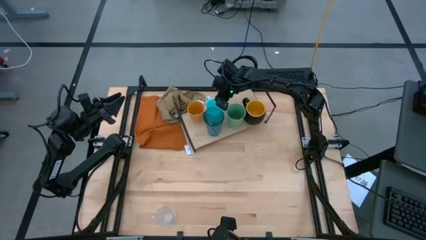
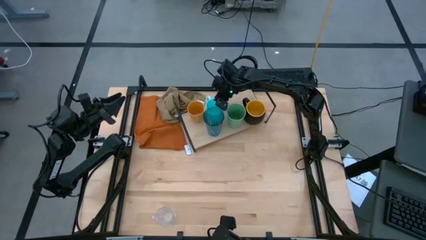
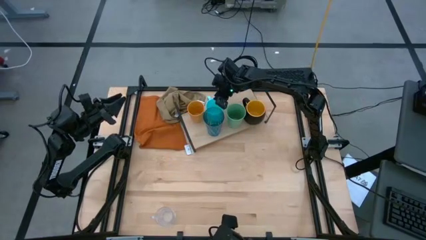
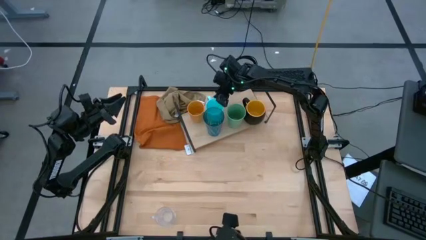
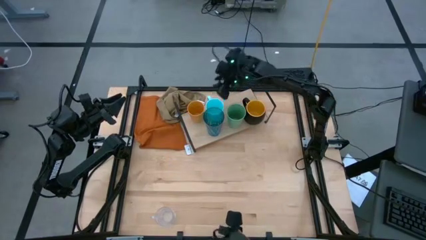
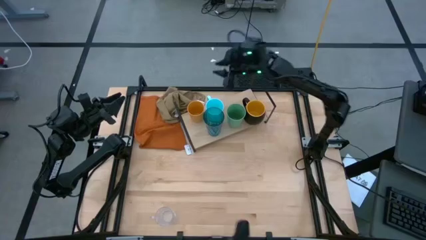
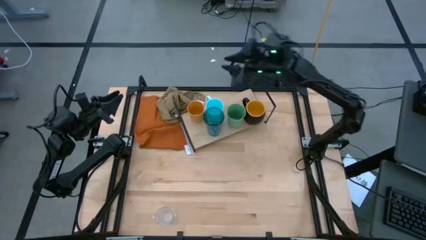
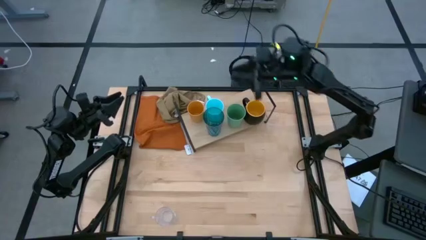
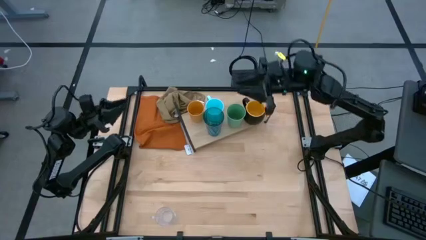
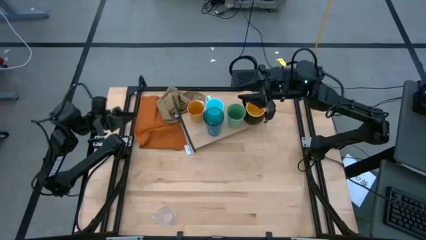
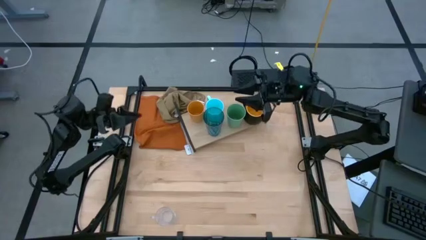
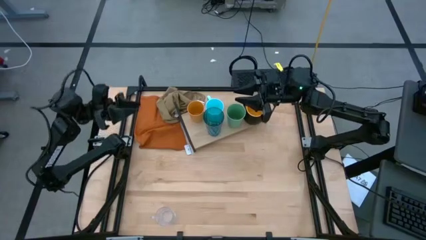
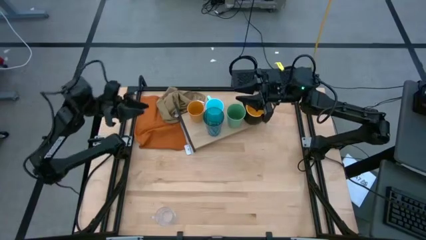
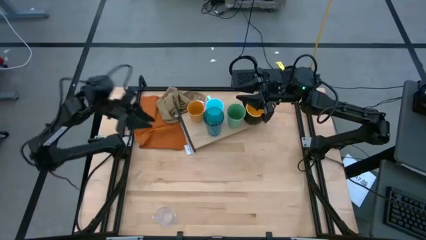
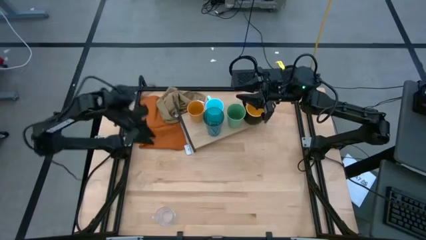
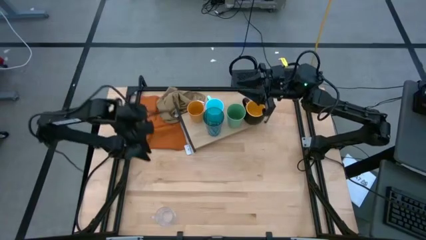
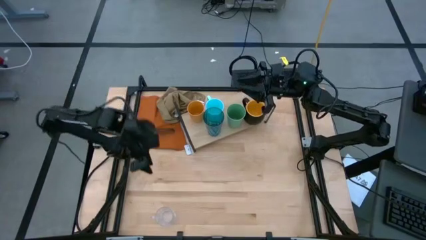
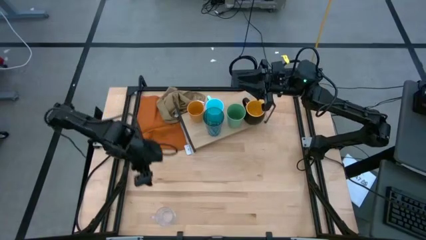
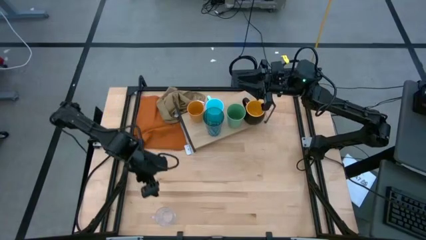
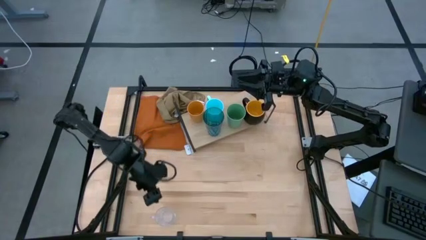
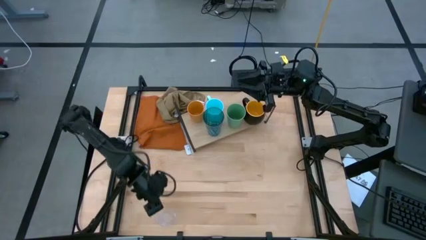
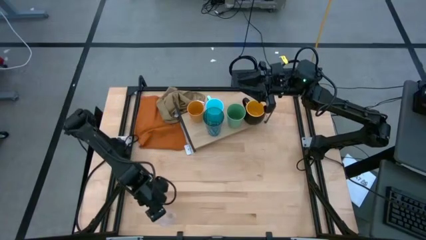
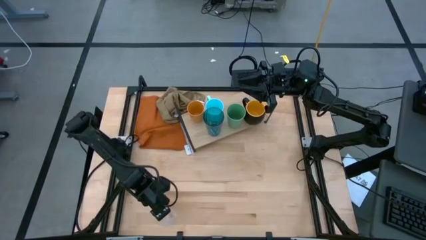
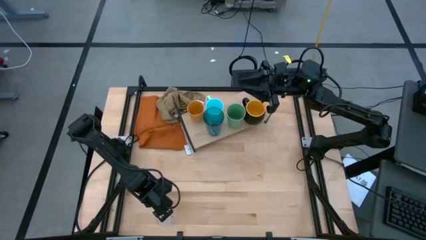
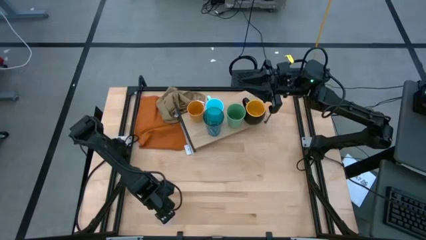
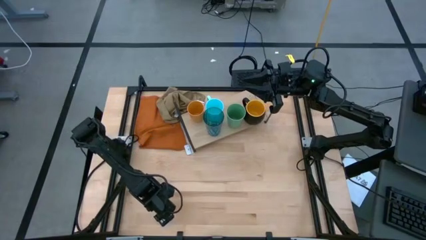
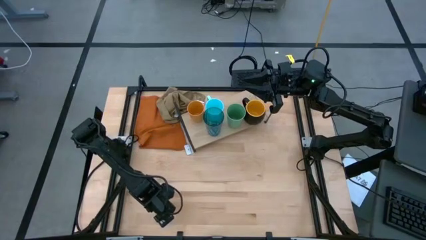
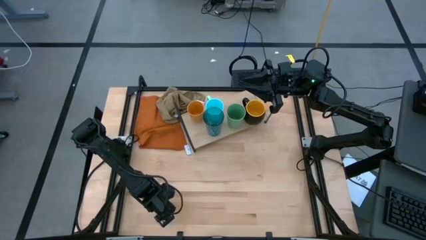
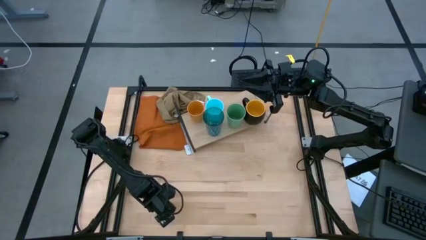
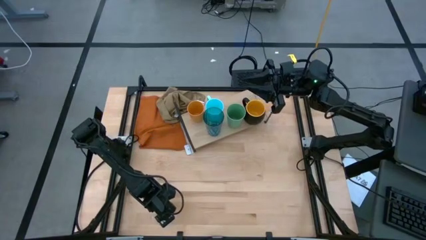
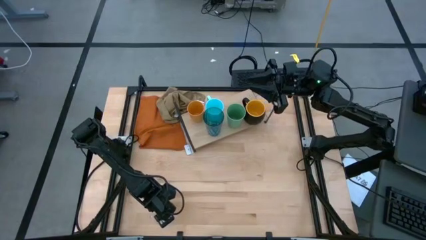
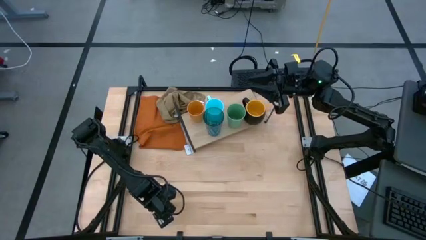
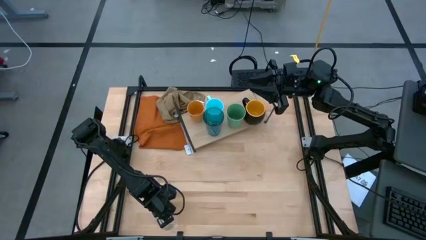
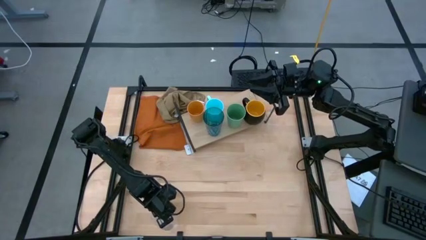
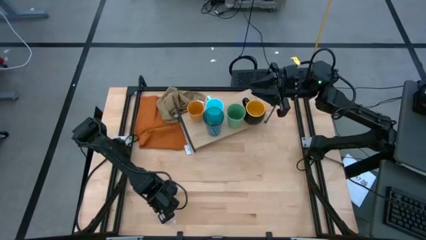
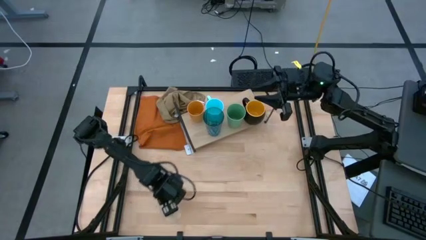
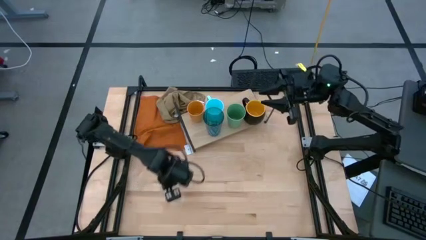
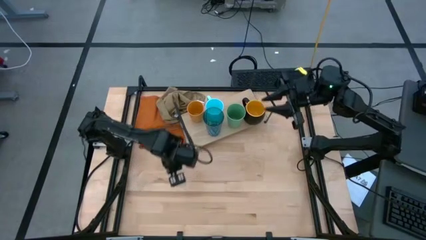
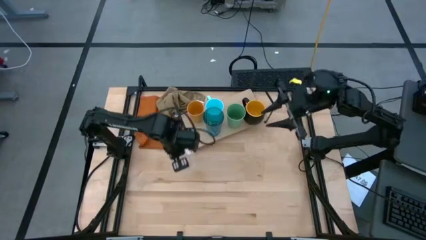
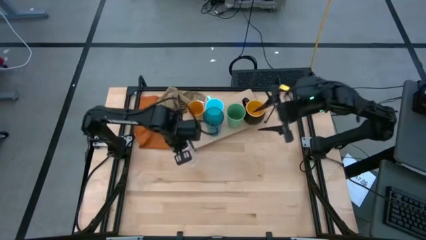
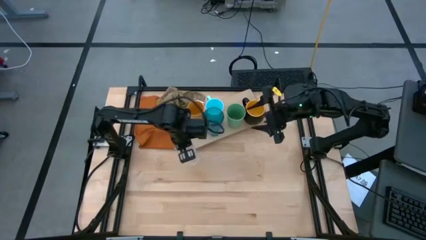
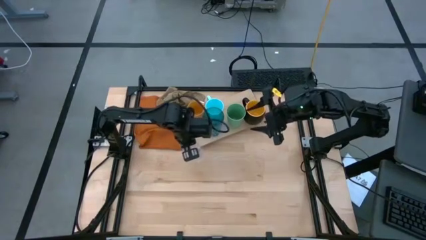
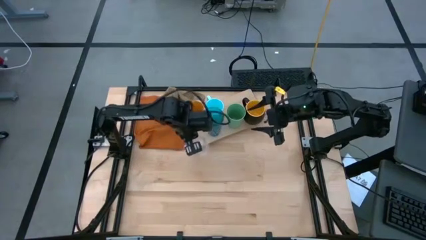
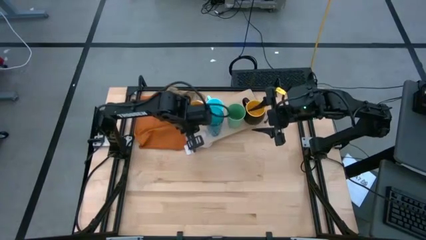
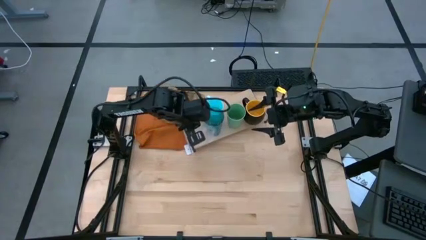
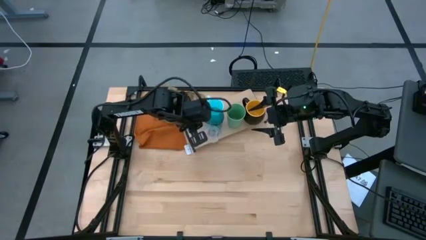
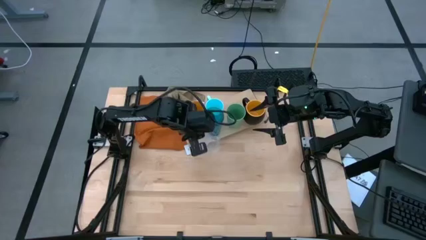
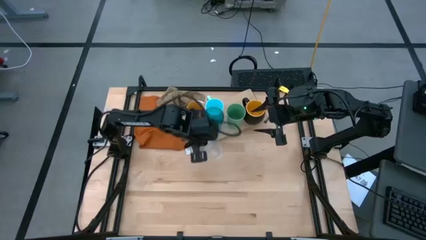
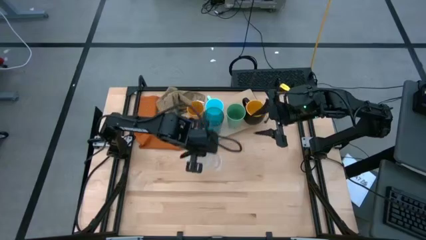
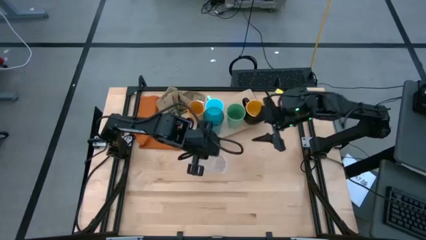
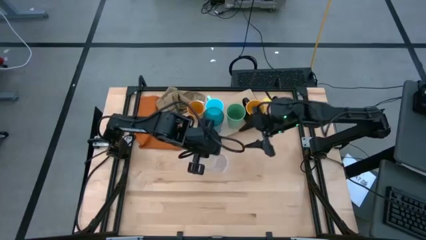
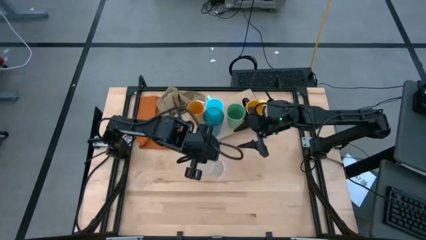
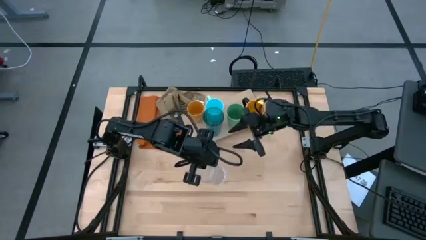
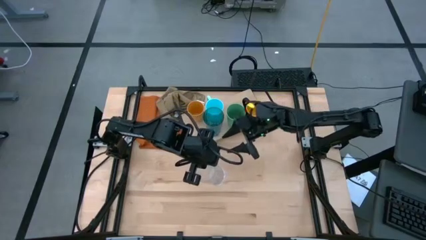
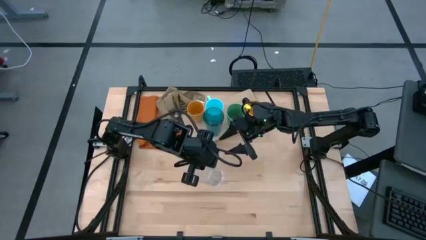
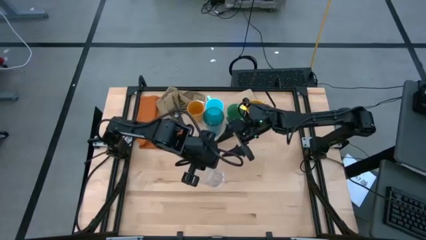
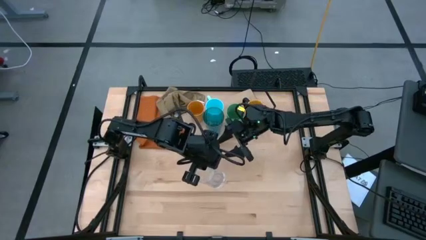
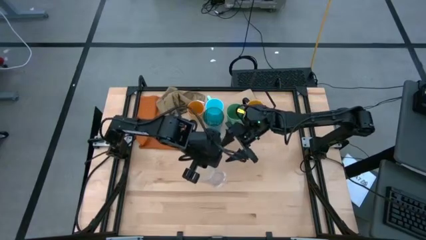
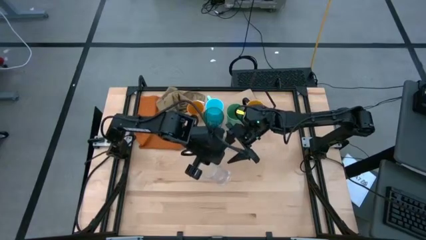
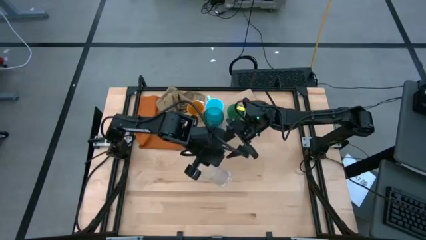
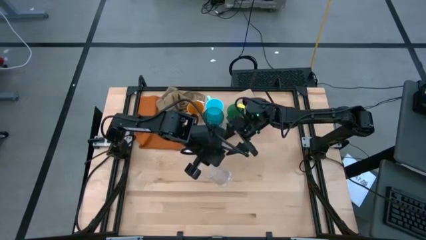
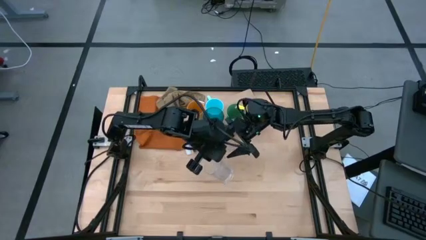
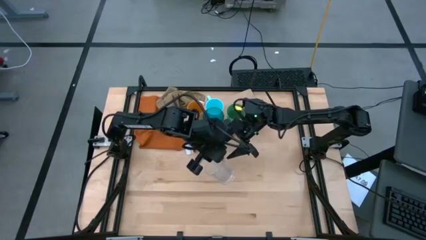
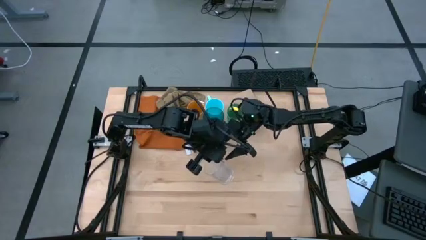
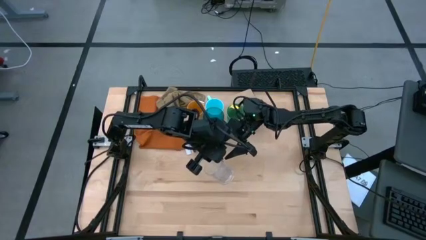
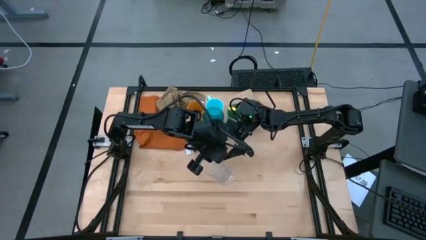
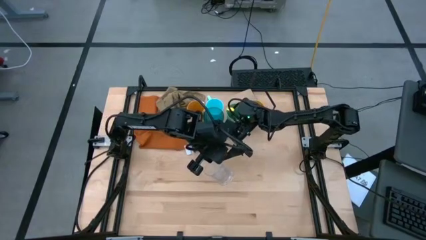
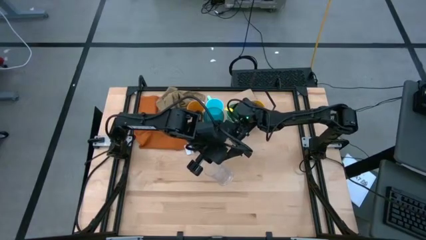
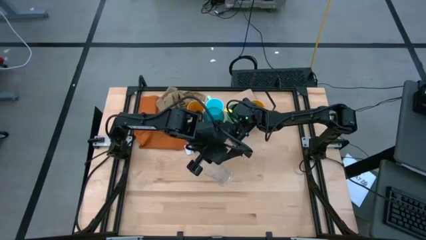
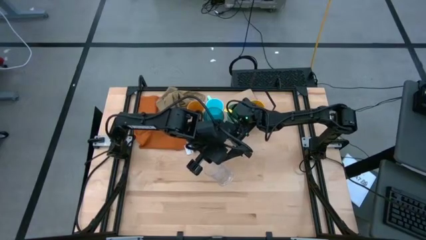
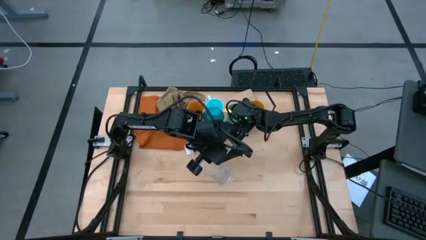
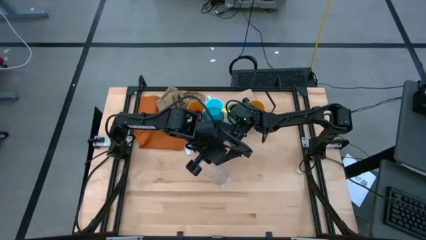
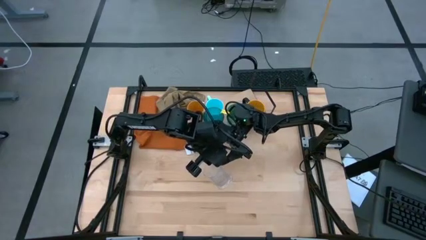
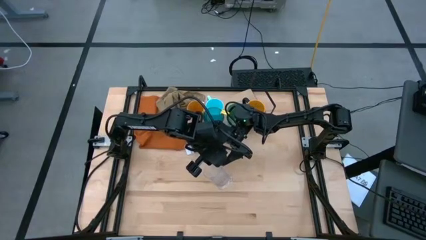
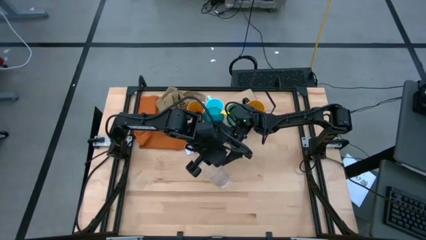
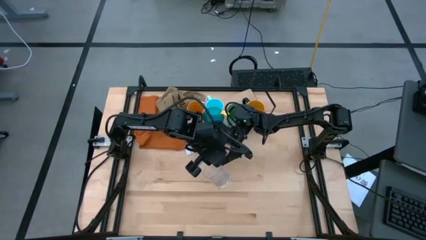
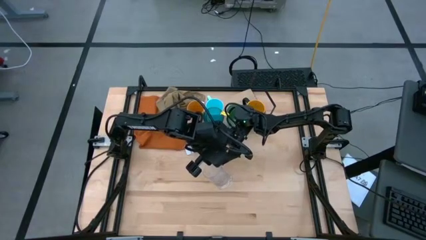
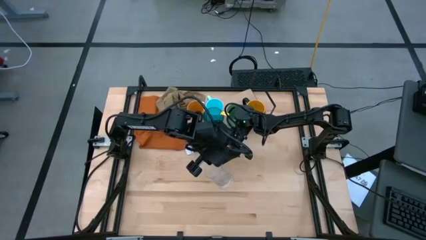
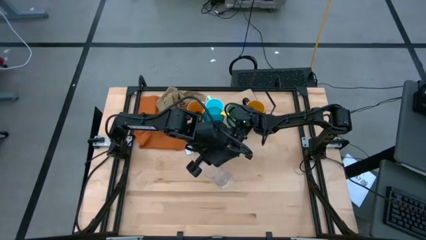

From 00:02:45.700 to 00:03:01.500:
Task: Stack small to large cups/mugs on shelf
Put the transparent mug on the shelf
